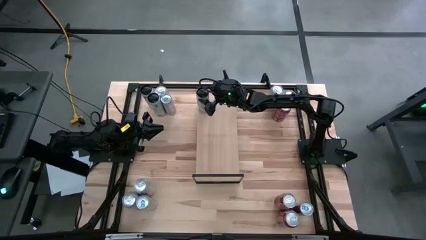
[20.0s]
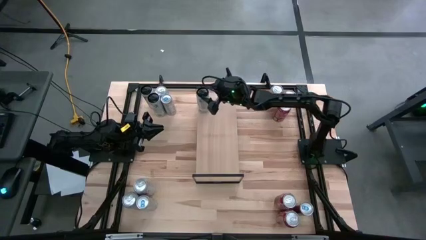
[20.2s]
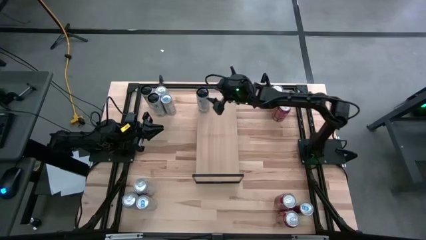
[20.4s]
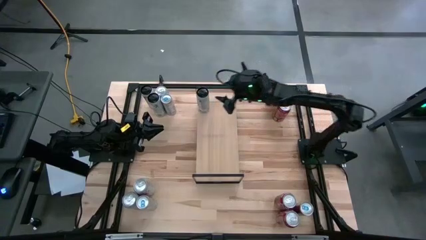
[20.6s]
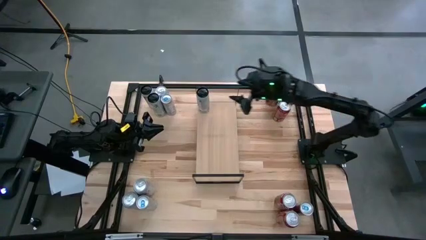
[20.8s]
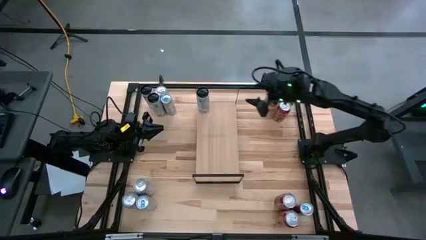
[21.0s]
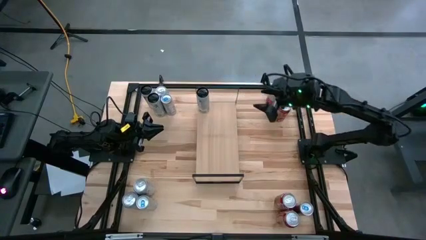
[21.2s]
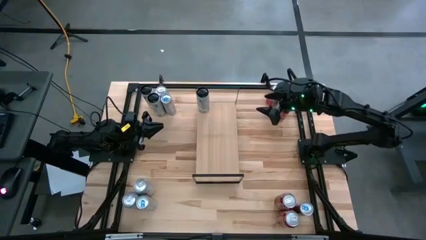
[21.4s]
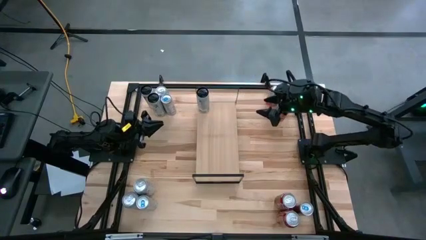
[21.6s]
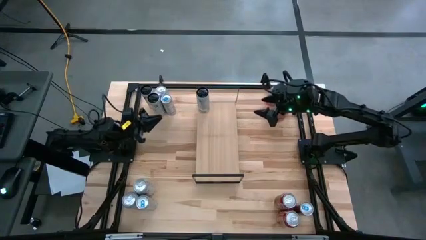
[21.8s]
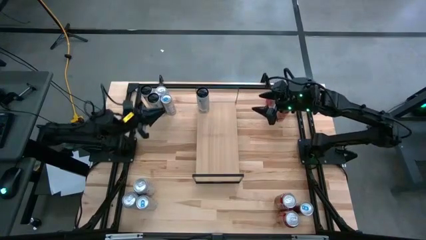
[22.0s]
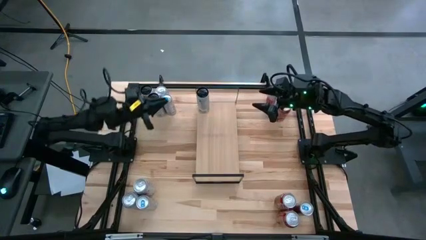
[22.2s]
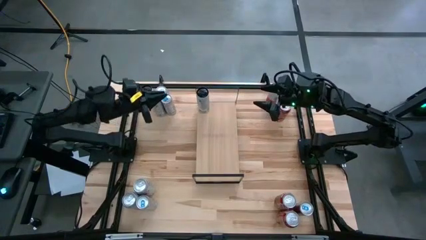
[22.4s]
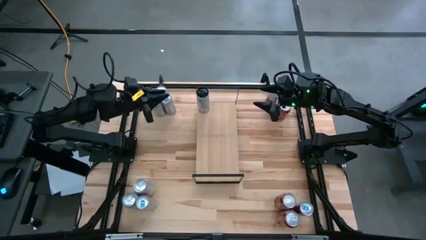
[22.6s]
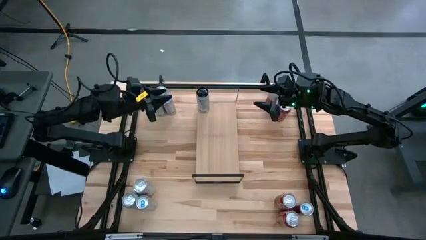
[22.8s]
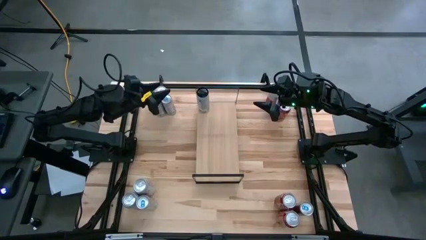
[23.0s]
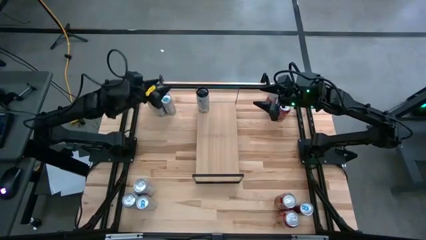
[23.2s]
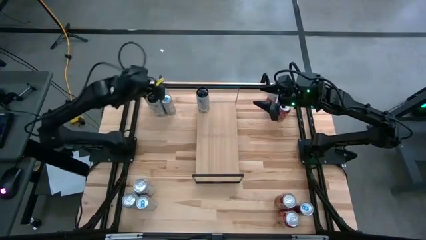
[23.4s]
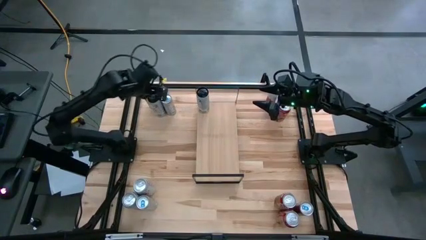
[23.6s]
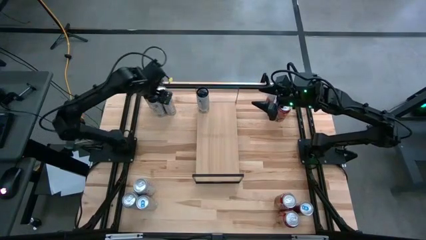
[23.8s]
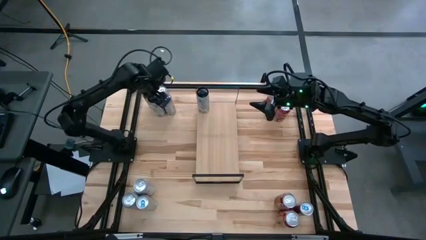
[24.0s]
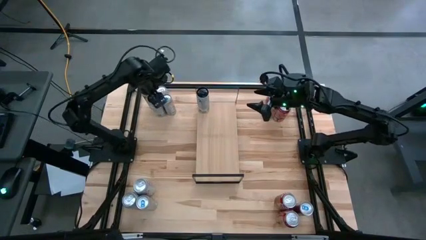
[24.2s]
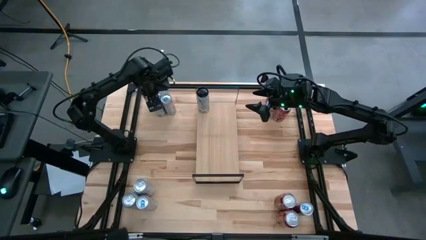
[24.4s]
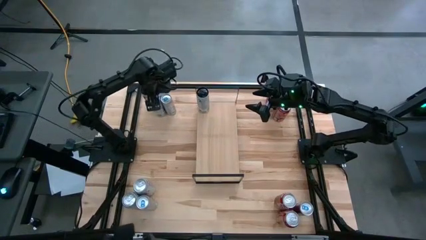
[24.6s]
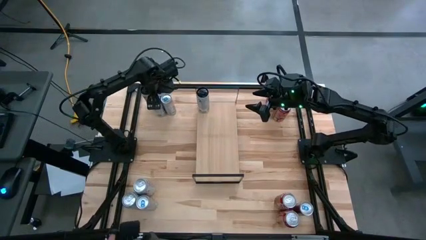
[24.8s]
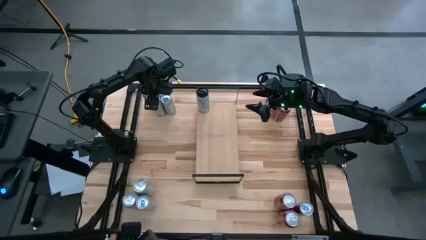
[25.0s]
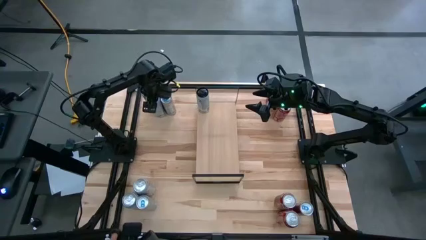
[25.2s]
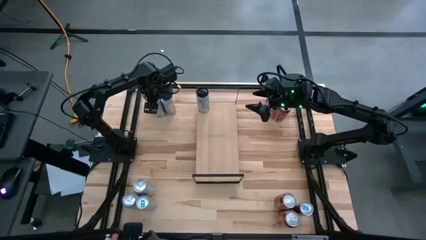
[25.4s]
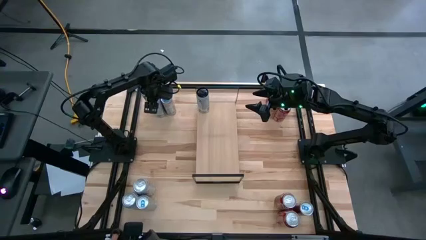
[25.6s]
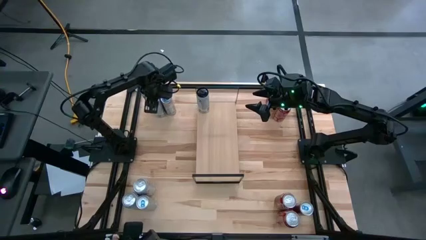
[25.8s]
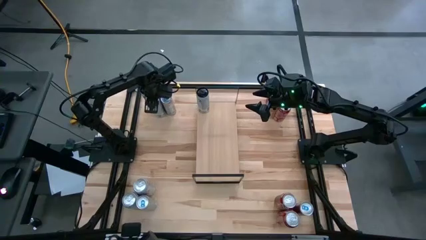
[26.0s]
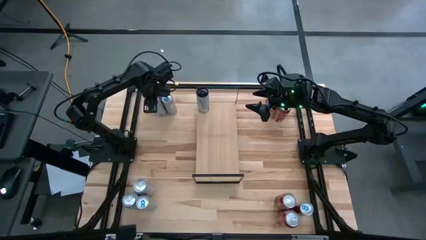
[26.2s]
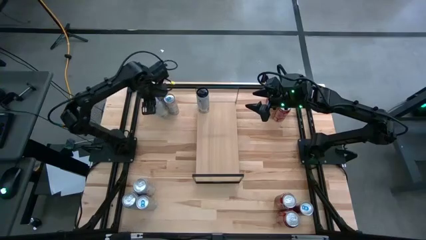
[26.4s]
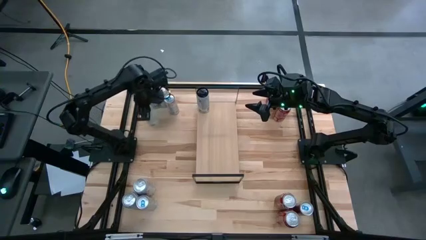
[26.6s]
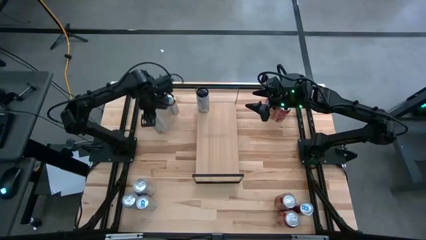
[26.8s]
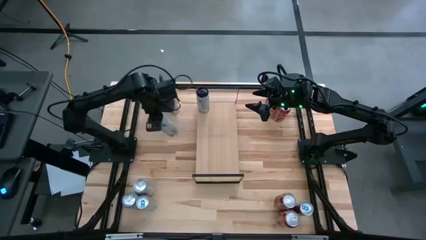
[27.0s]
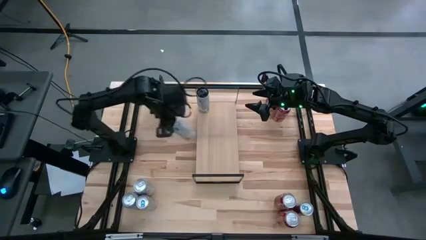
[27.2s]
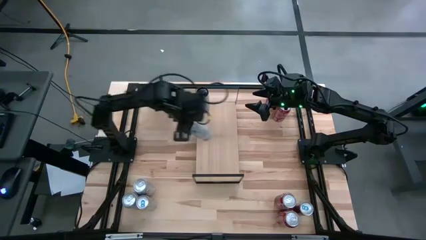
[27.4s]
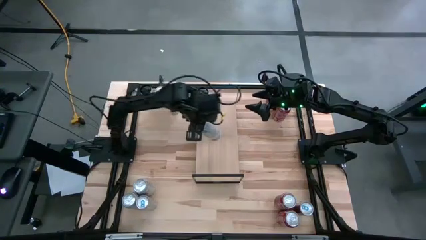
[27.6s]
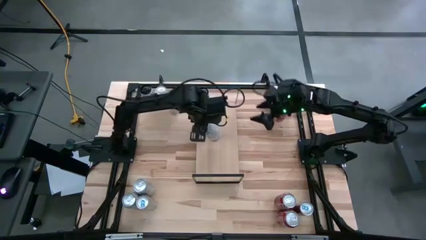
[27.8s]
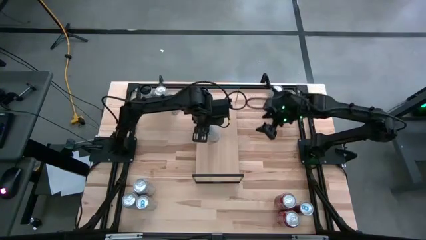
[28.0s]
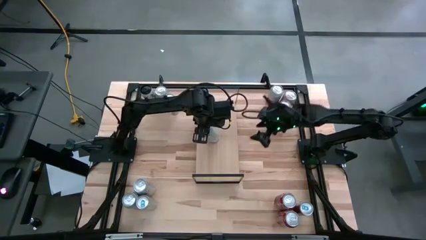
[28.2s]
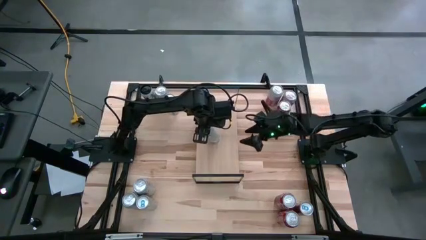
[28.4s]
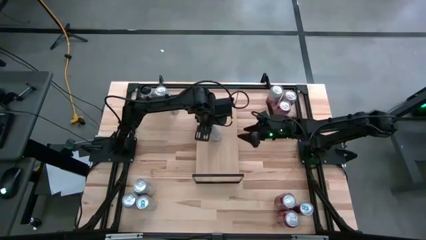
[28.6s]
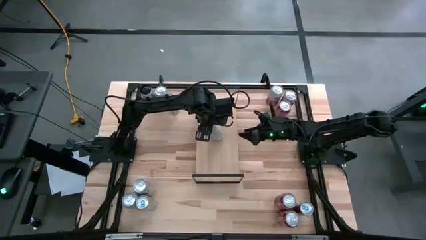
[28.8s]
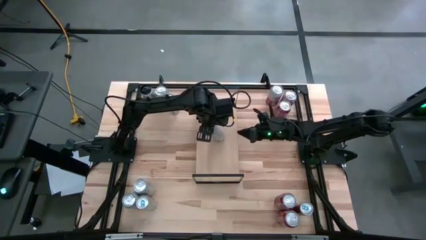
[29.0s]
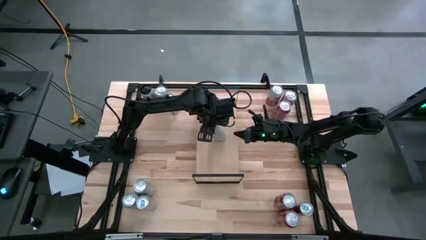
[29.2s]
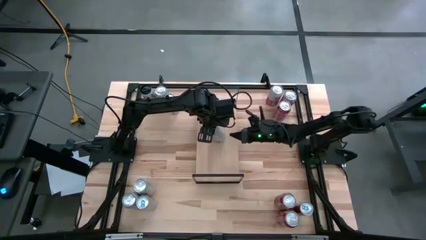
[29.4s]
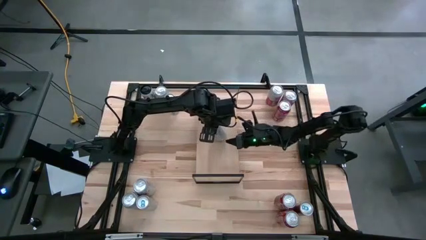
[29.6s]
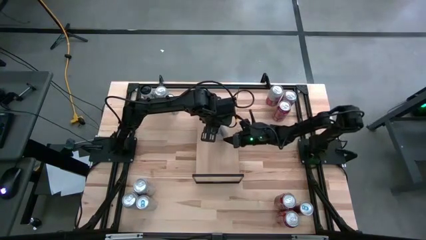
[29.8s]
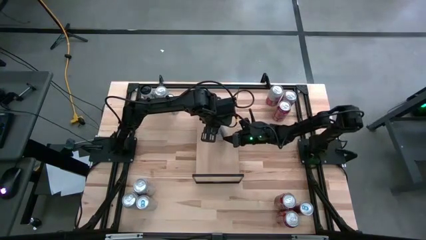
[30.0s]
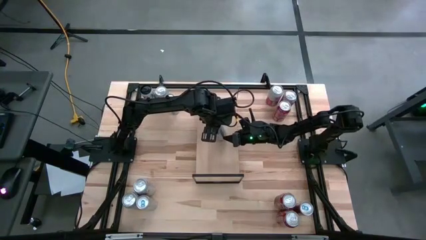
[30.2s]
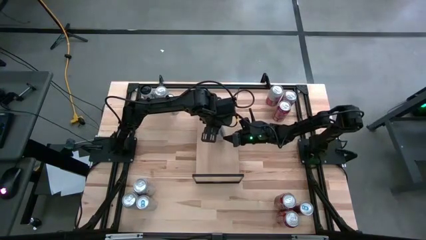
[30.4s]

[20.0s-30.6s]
Task: Place canned beverage on shelf
Put the bottom white-pink soda can on the shelf aligned with the other white-pink soda can
